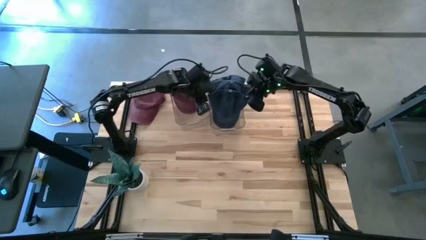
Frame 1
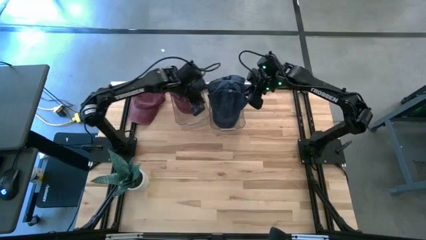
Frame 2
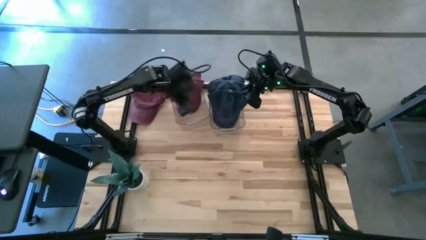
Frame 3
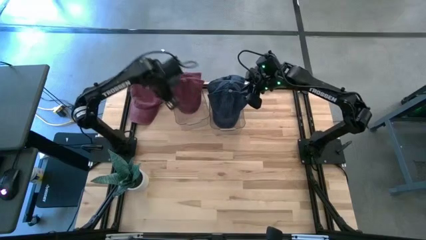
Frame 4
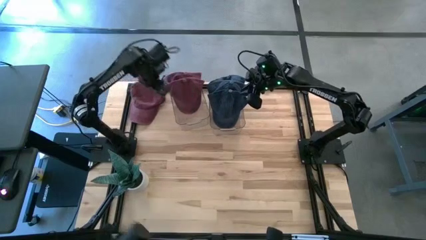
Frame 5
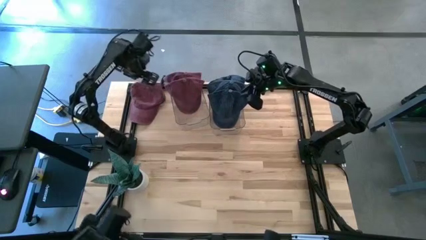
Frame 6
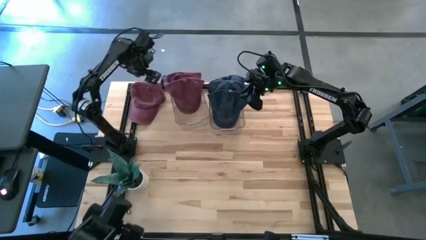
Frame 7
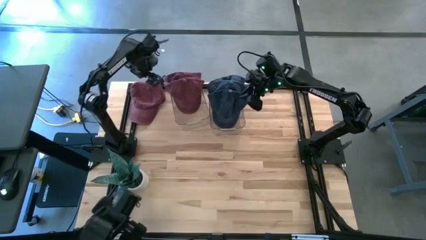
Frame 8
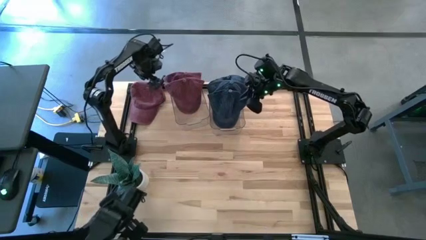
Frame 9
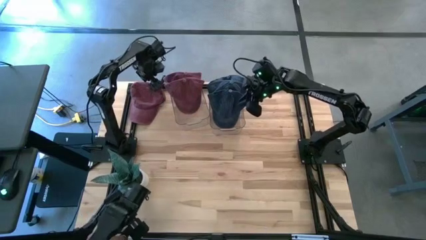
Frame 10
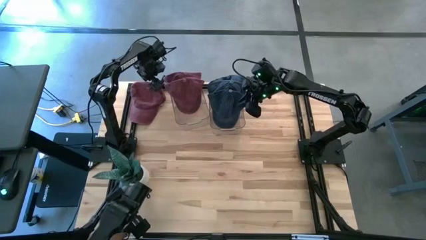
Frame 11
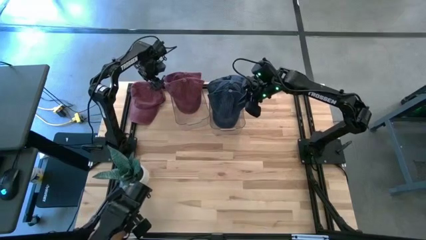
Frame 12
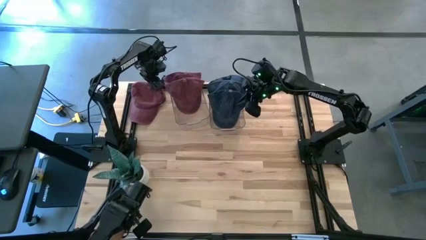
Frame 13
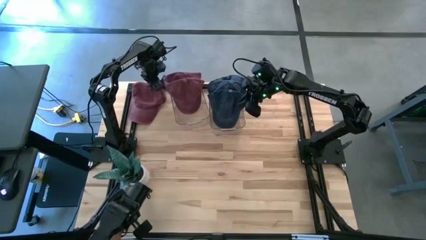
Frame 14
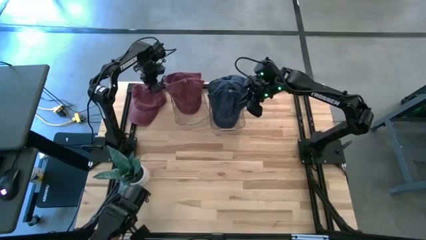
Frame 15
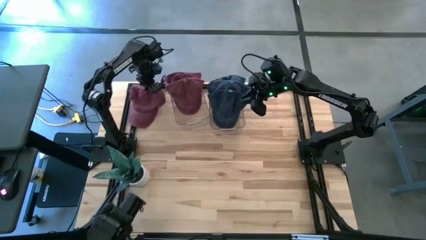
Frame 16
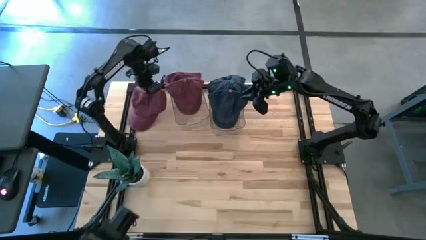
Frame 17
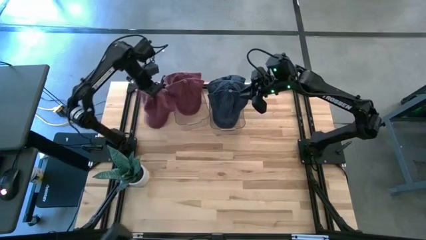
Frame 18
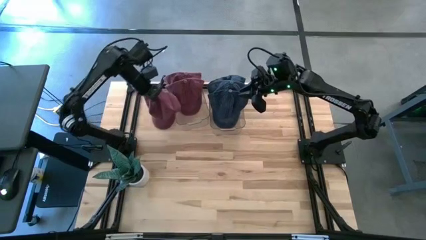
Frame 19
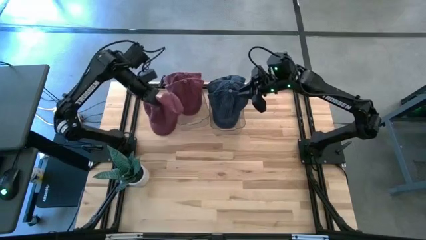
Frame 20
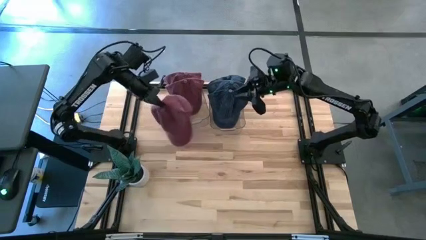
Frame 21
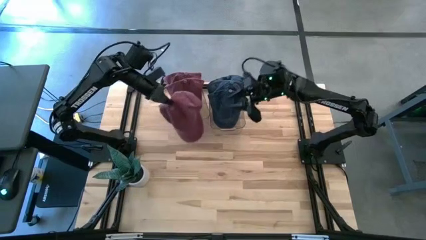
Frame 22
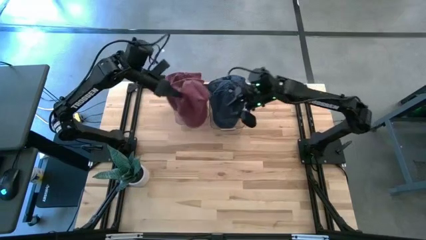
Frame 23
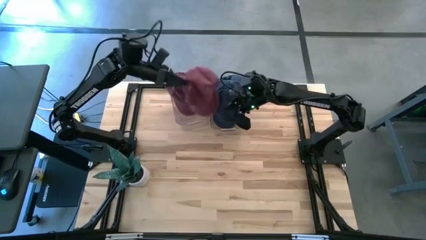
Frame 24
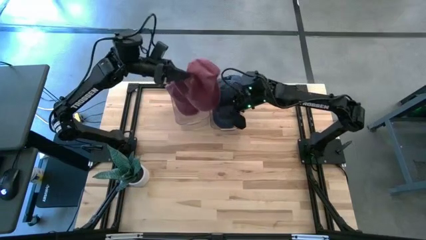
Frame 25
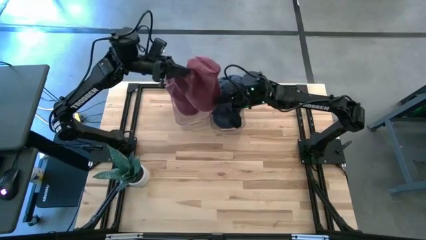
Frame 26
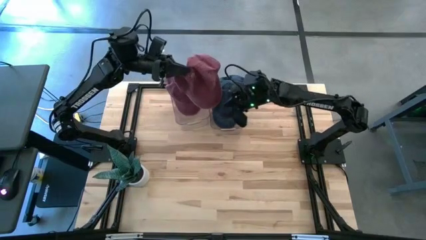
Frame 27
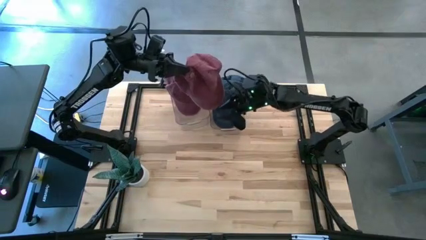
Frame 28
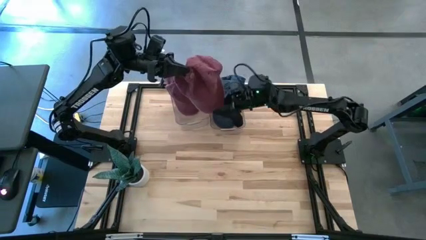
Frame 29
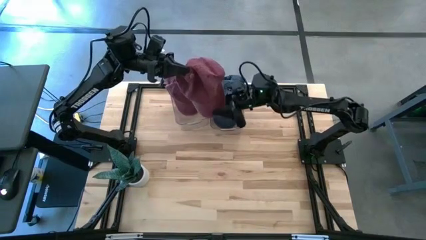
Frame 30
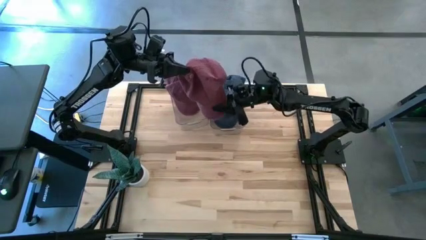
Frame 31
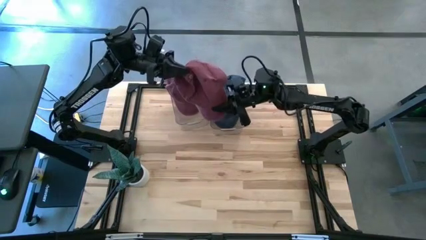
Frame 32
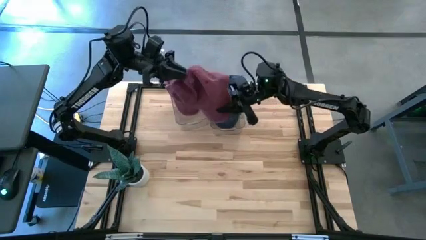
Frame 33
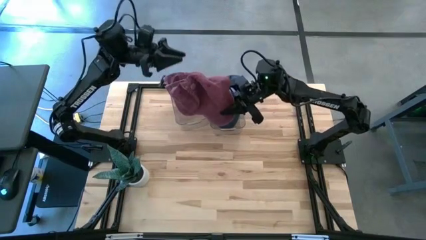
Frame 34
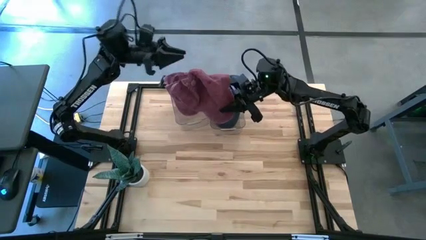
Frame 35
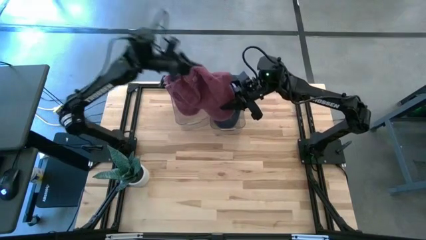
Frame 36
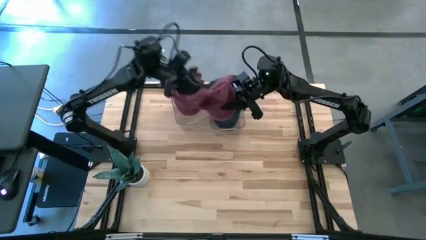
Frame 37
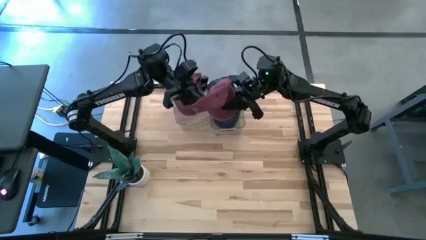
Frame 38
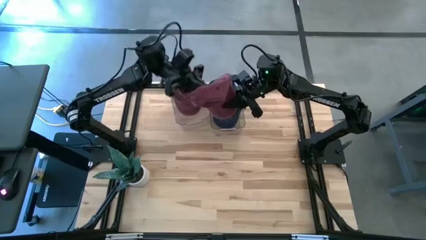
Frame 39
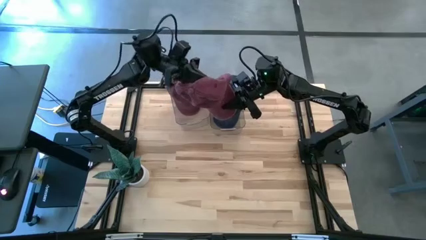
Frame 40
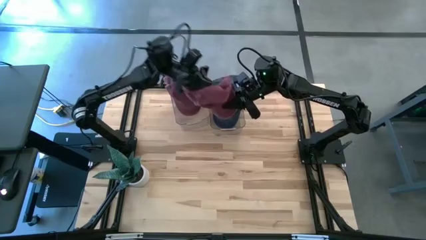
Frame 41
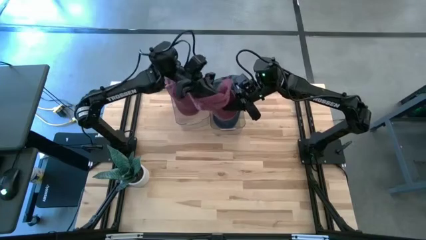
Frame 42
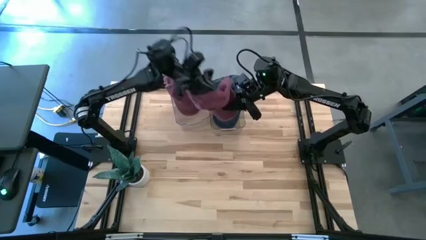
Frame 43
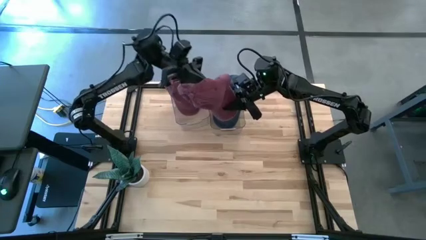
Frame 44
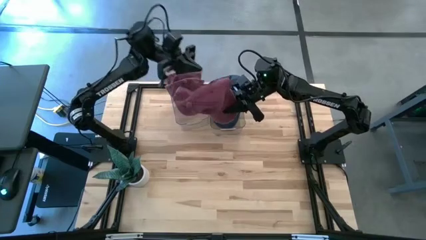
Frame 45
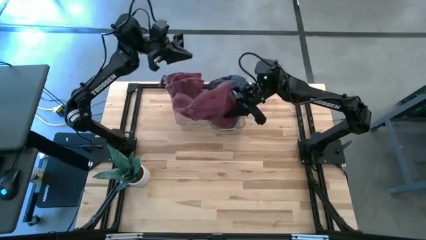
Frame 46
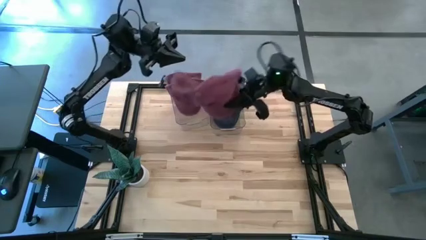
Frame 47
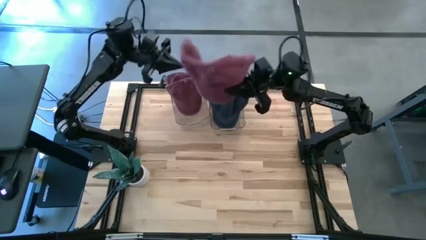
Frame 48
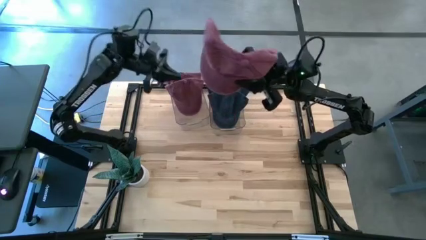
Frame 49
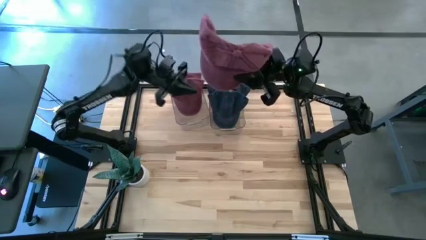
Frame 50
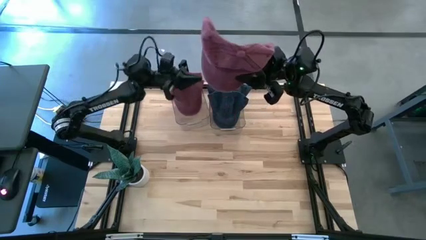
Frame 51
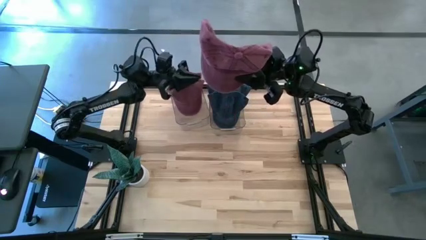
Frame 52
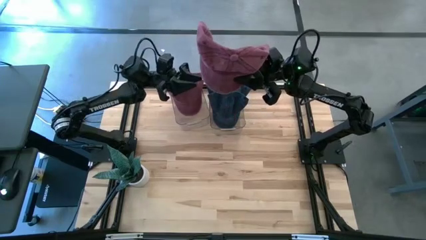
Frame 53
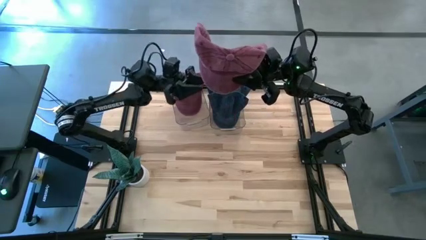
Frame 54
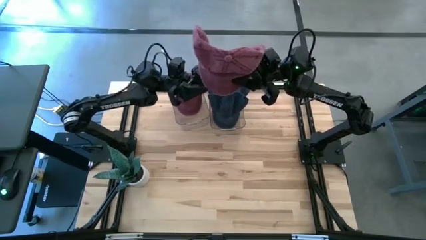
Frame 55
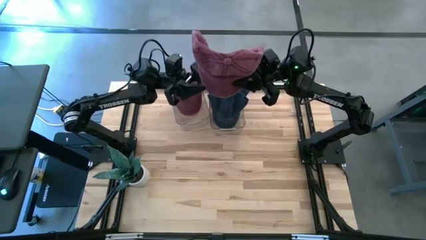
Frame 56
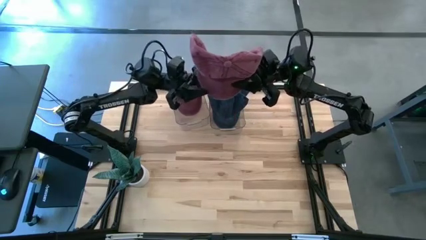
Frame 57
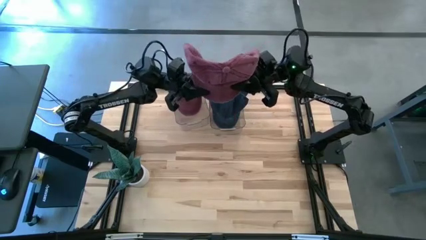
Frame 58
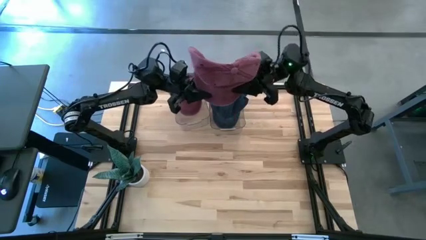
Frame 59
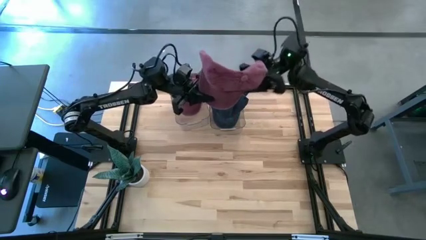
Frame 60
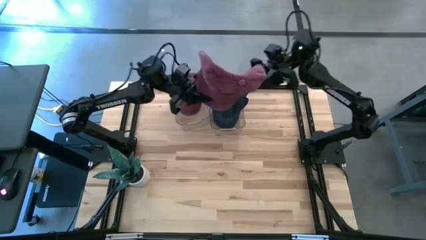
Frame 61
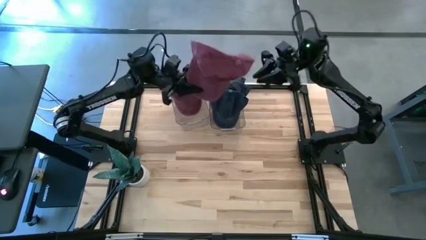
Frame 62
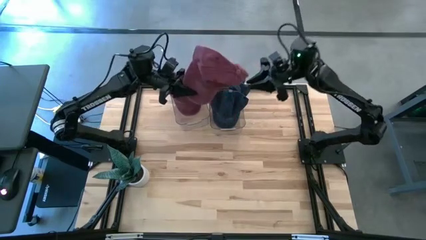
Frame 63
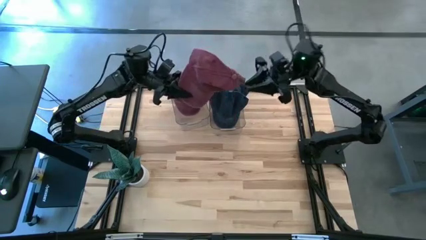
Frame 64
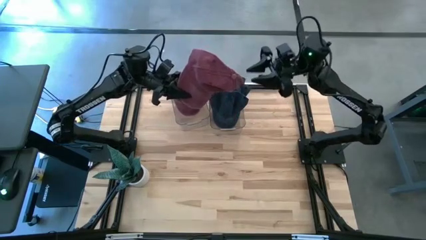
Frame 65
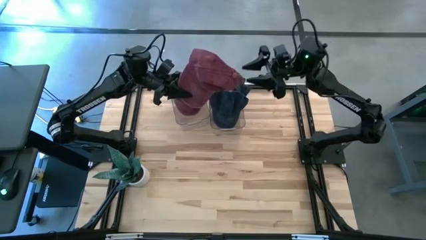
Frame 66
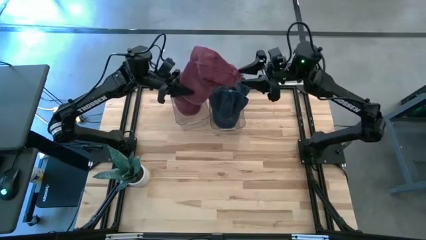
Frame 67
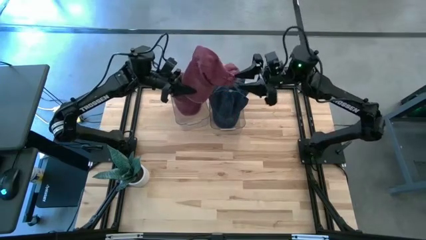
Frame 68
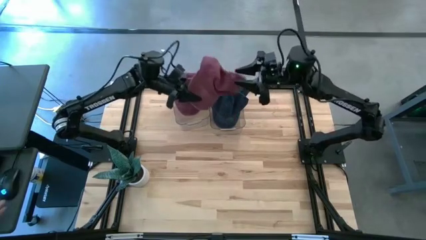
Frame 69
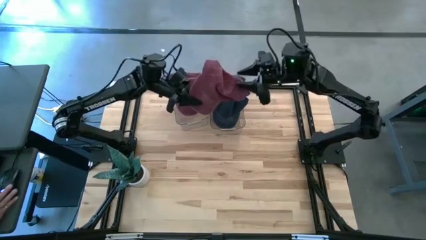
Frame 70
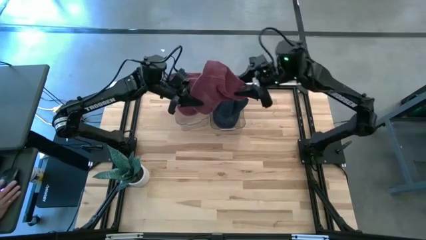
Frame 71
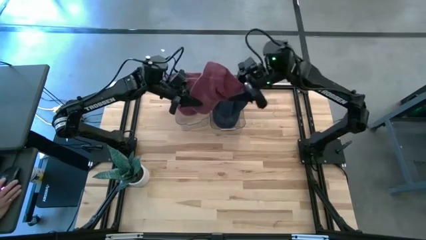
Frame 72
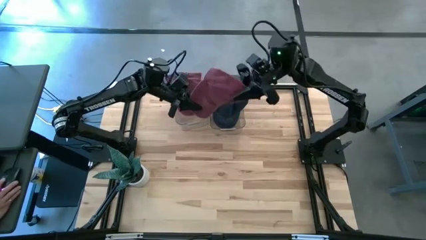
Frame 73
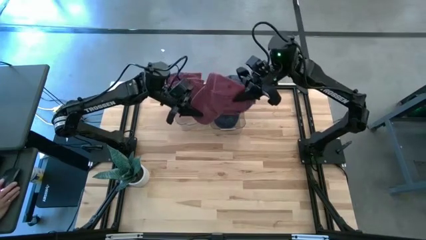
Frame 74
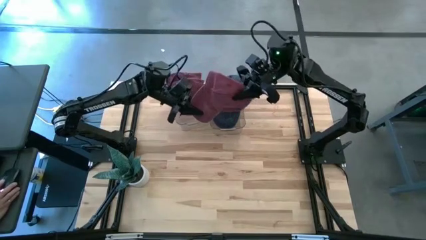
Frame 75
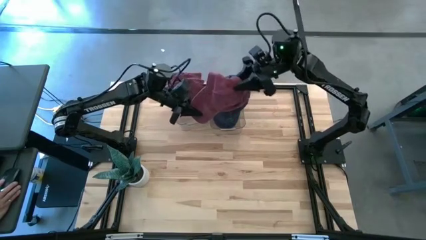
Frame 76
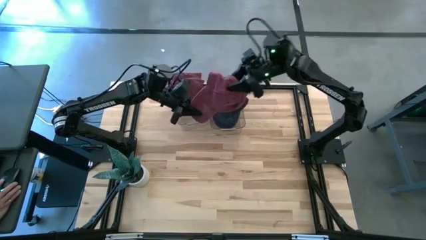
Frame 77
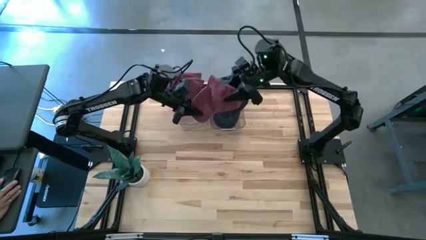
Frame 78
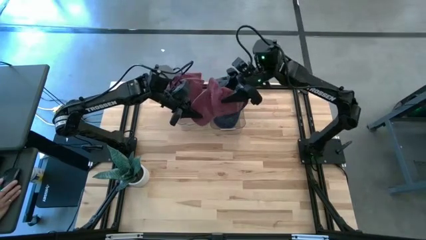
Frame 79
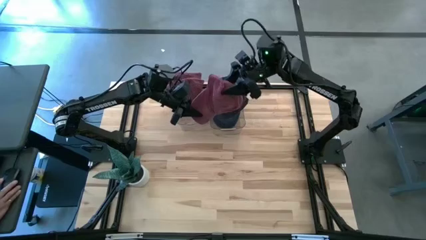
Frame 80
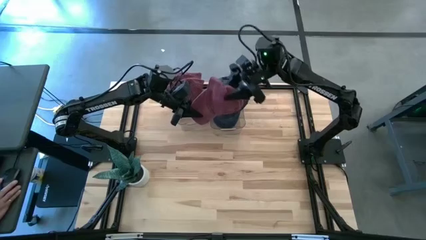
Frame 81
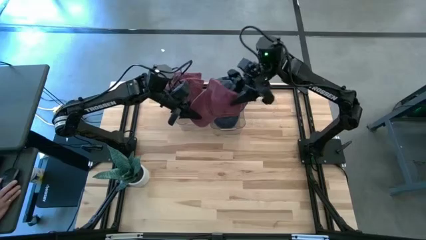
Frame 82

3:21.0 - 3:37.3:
Task: Pick & Place hat
Put the red cap into the left bin
